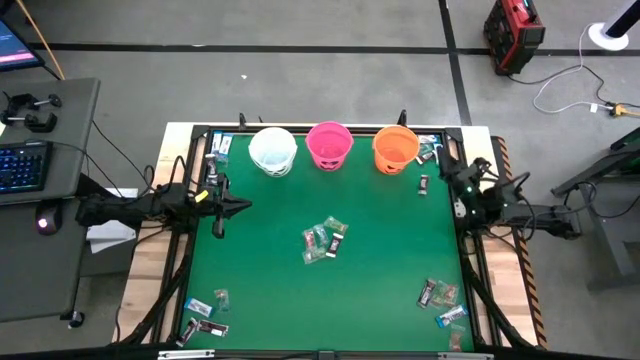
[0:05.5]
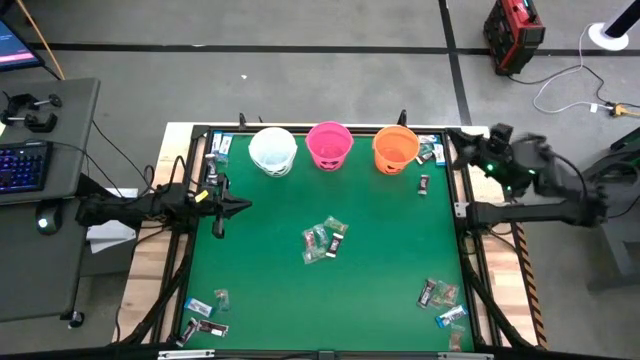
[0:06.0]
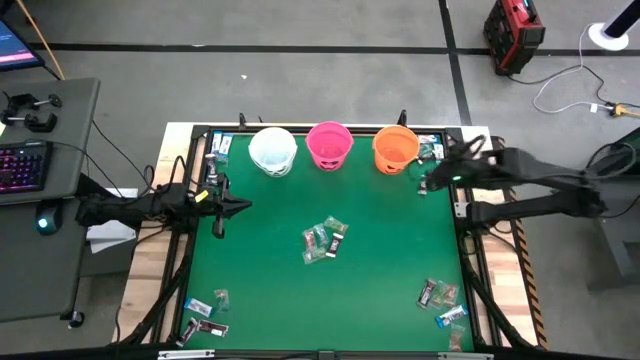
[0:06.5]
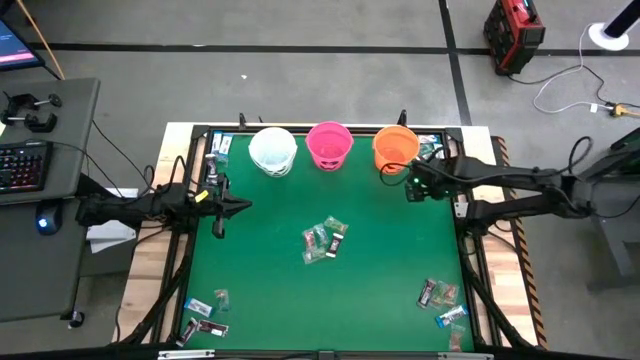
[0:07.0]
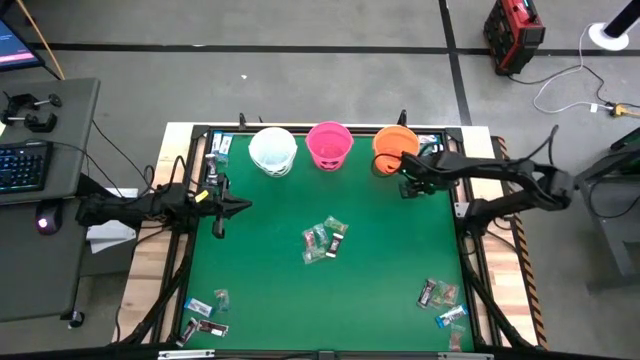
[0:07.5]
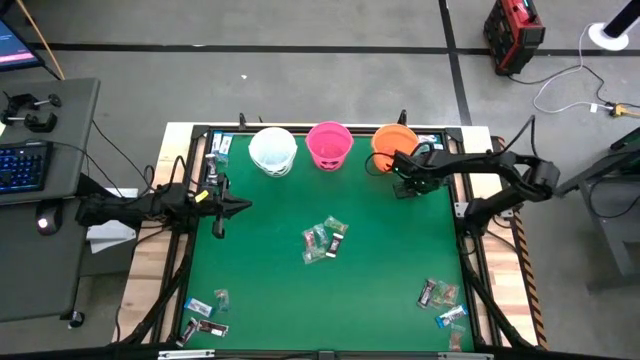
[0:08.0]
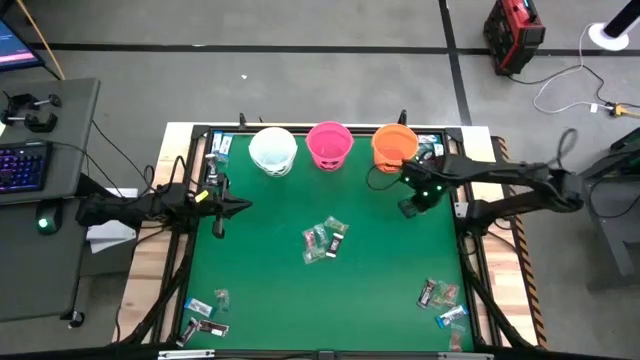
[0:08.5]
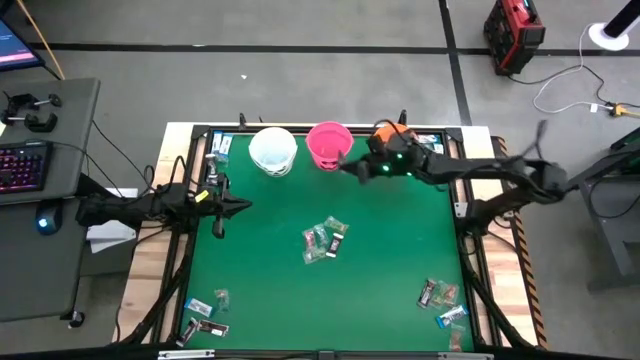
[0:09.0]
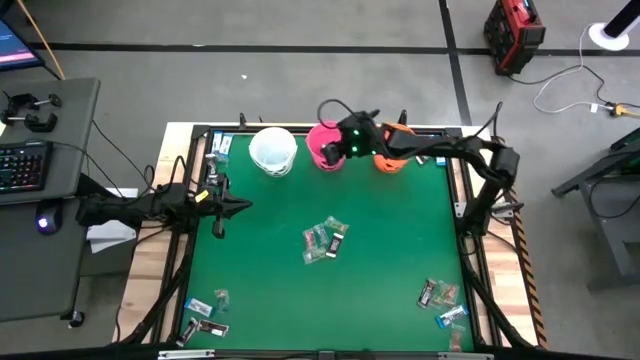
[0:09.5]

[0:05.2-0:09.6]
Task: Sort candy by brand, put in halloween buckets
Put the brown chocolate into the pink bucket

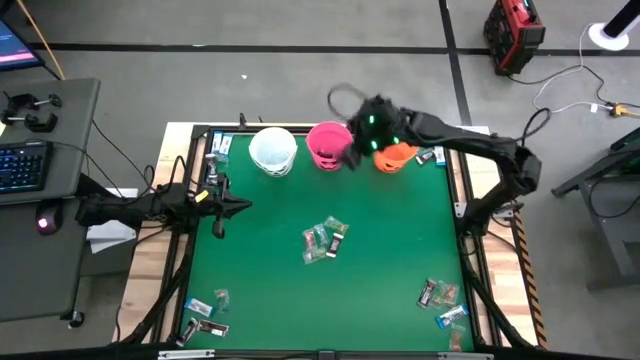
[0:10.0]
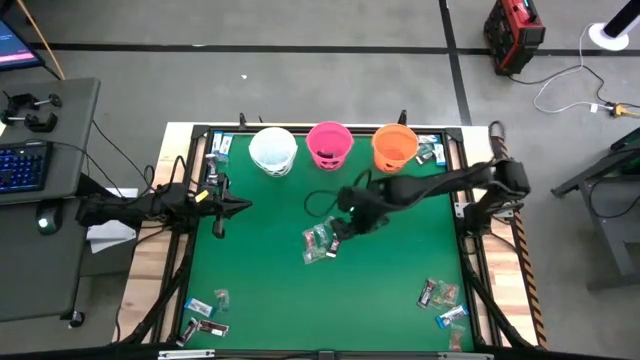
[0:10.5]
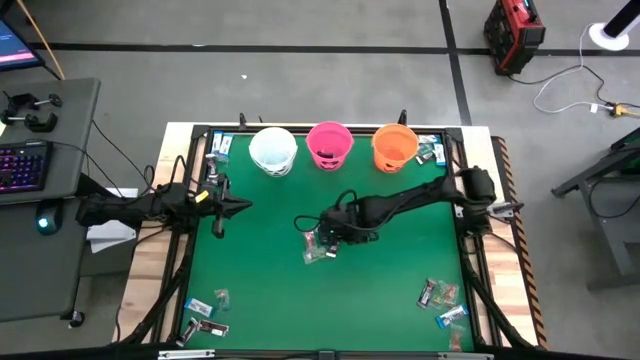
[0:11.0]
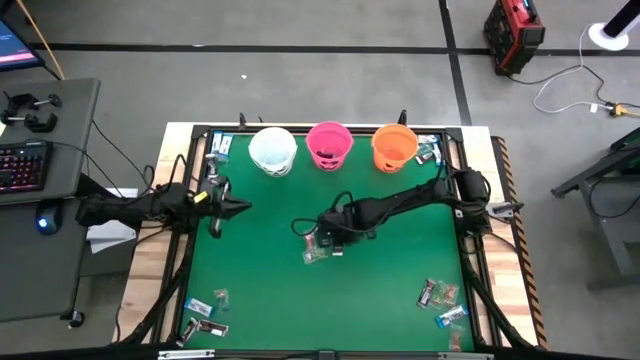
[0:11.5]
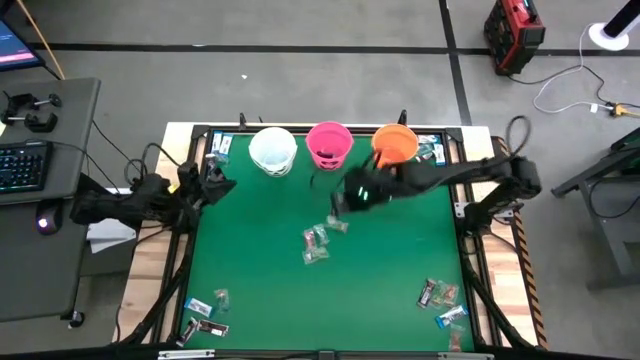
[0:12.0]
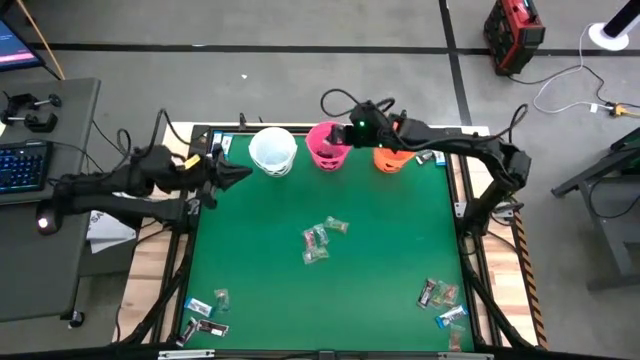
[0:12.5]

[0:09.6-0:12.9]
Put the brown chocolate into the pink bucket

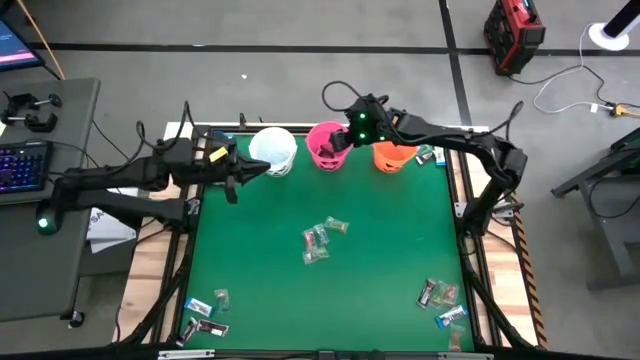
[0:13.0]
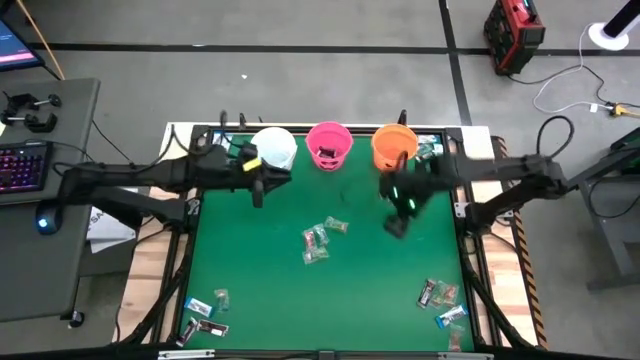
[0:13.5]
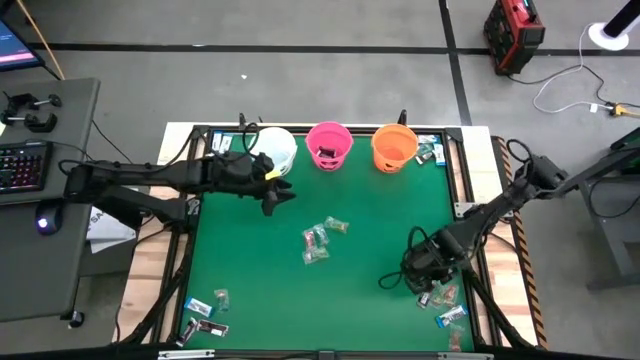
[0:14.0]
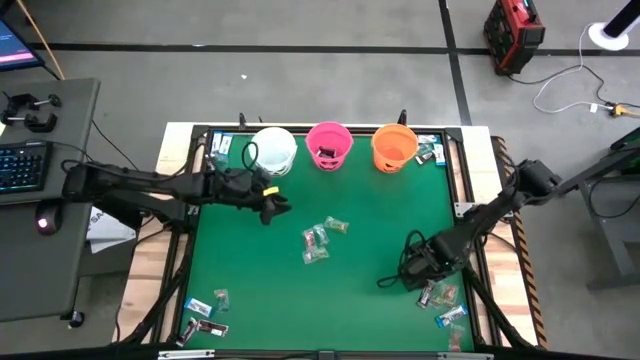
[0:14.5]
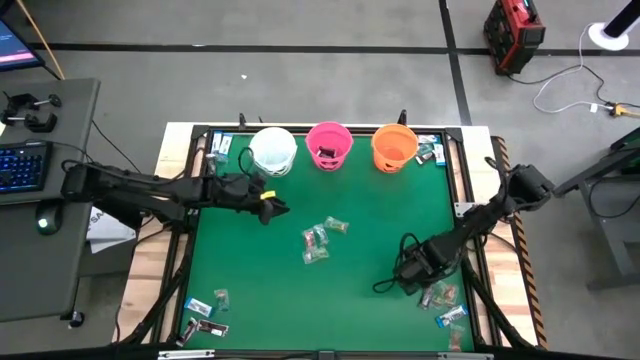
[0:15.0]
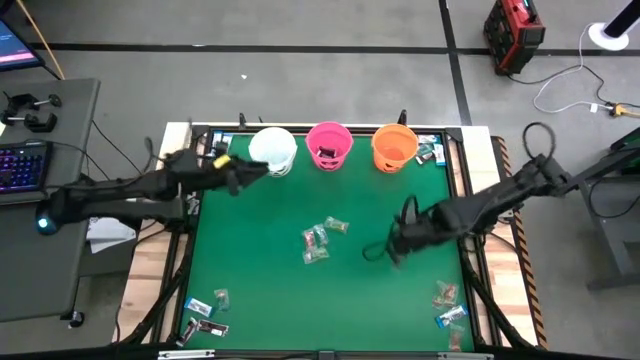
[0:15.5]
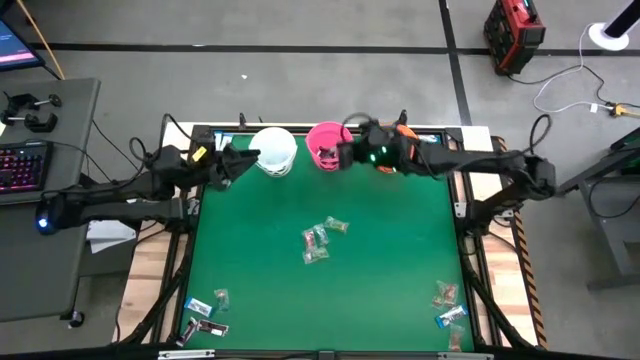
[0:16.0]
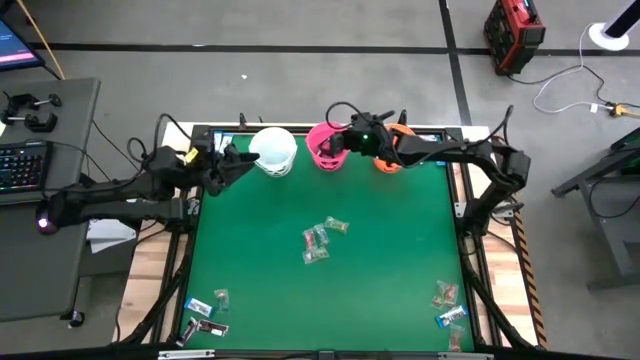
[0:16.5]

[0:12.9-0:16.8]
Put the brown chocolate into the pink bucket

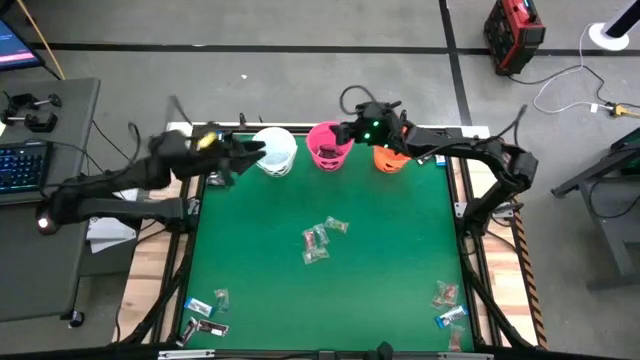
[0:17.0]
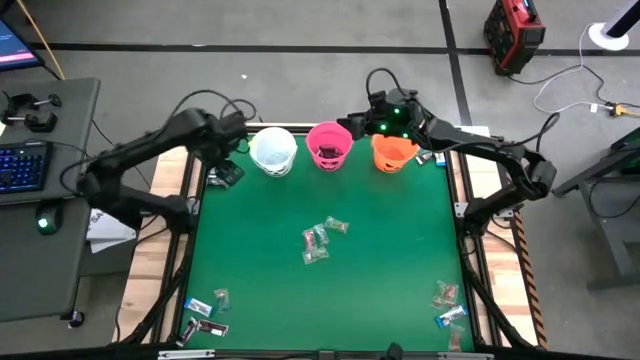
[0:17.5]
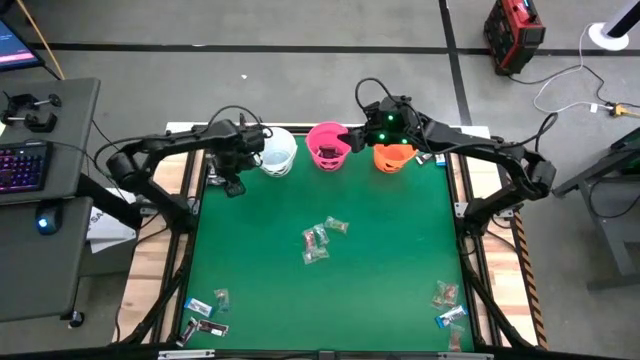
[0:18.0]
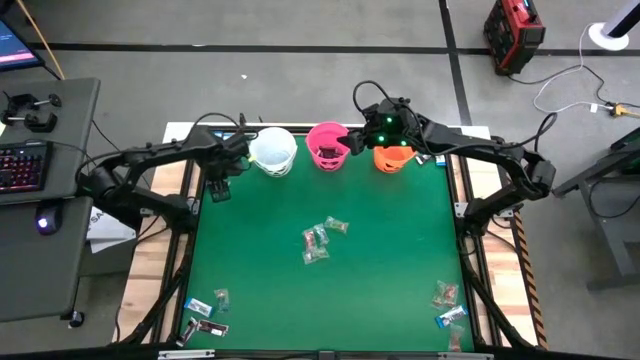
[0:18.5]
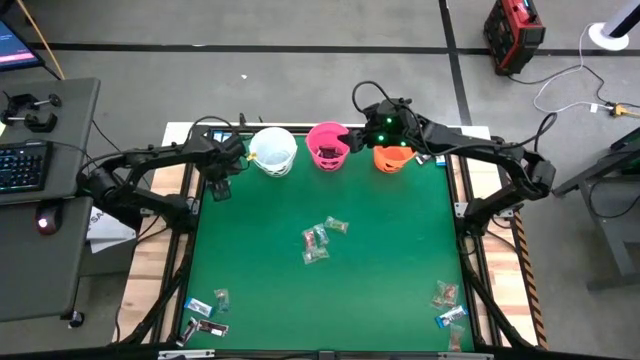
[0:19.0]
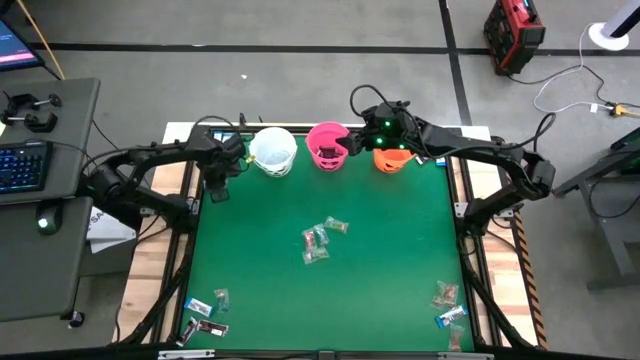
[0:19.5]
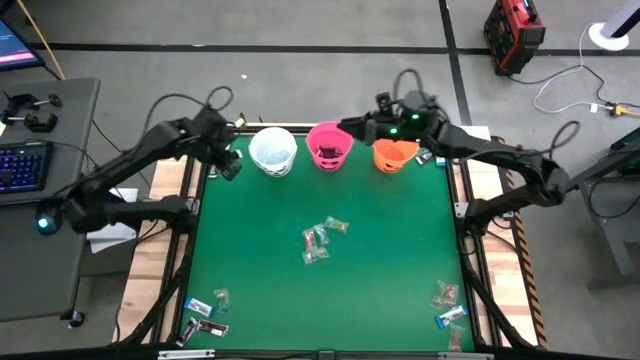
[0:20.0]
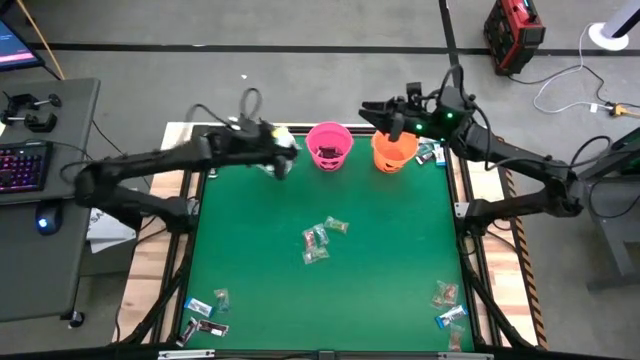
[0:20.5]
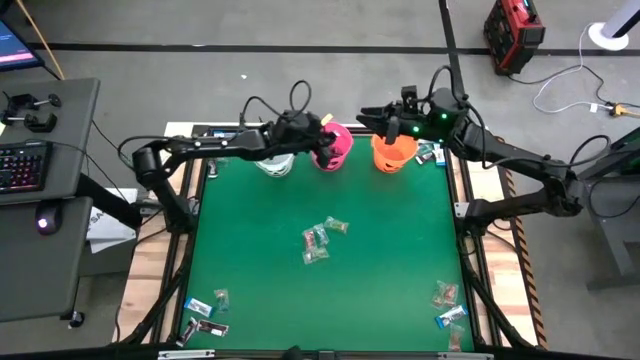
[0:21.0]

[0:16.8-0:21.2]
Put the brown chocolate into the pink bucket

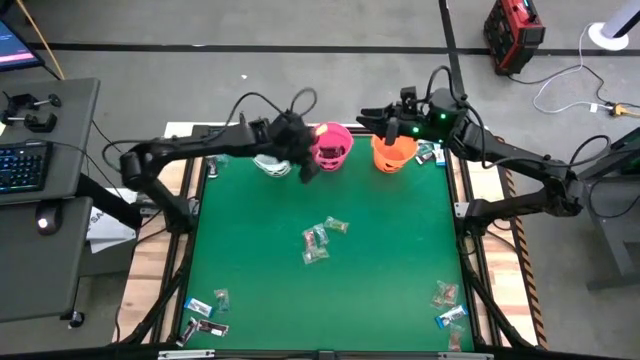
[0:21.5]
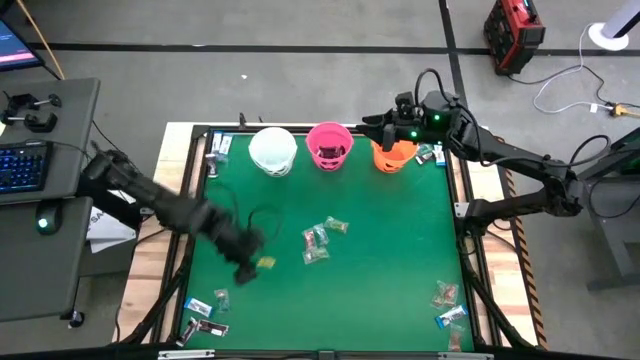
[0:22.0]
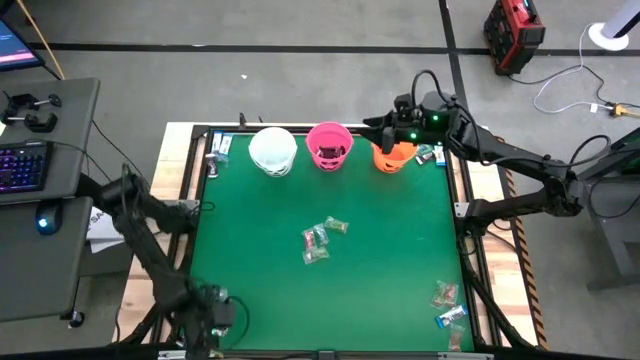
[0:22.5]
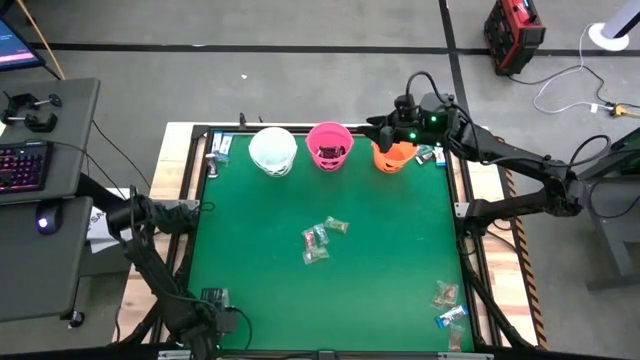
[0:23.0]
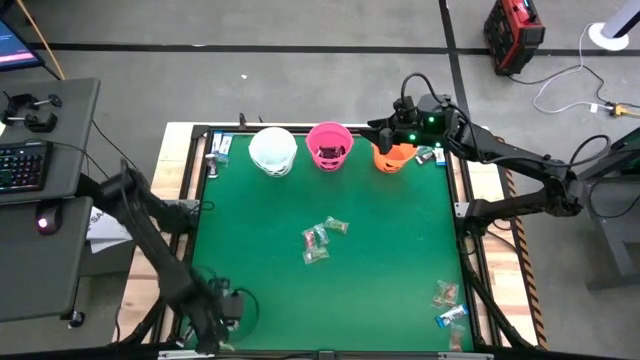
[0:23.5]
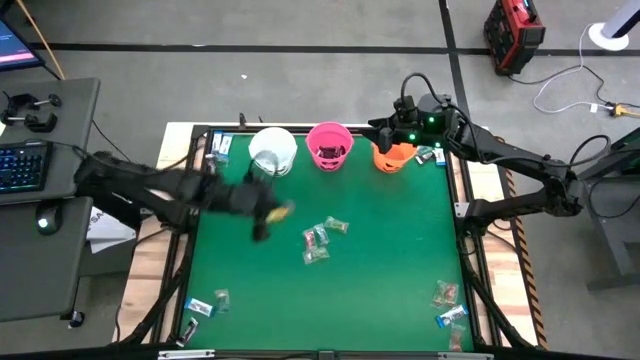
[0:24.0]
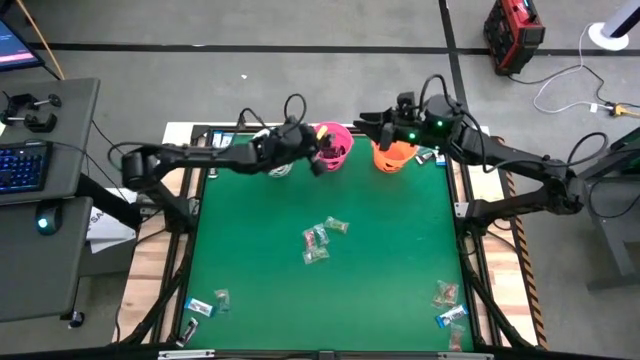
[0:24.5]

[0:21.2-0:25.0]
Put the brown chocolate into the pink bucket

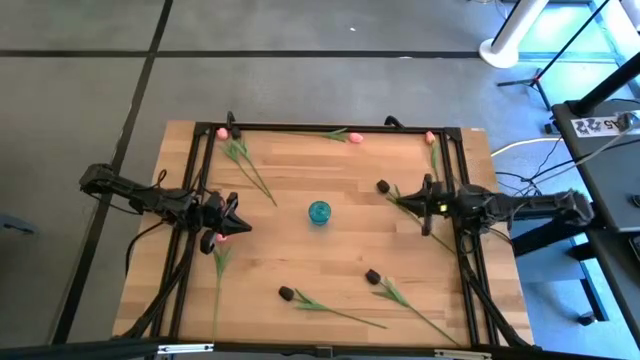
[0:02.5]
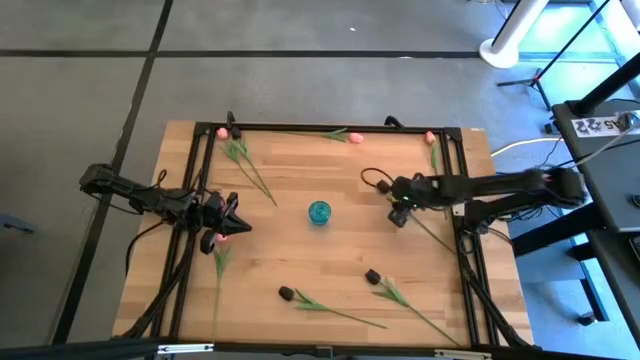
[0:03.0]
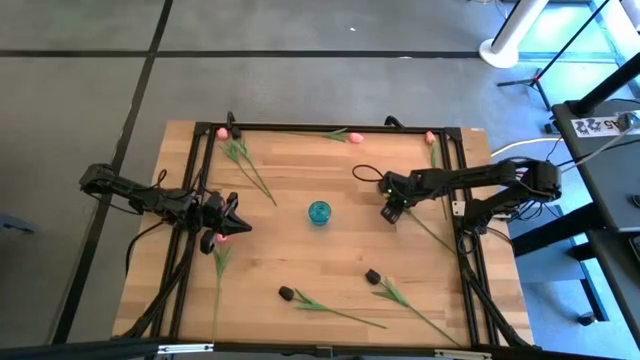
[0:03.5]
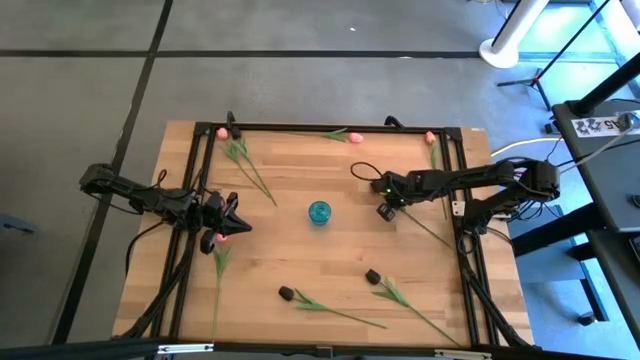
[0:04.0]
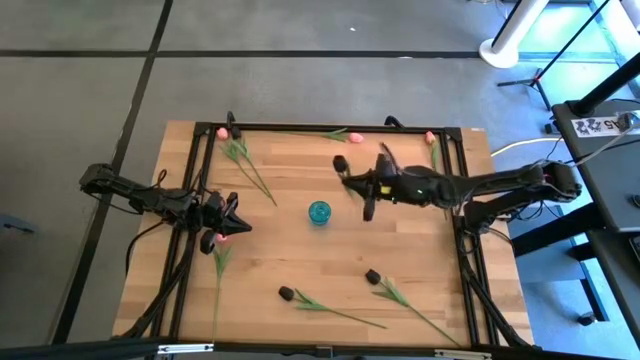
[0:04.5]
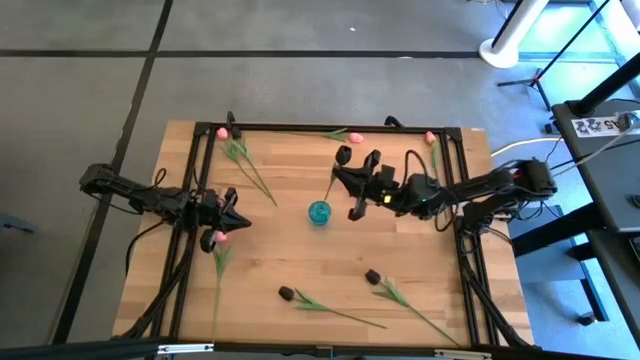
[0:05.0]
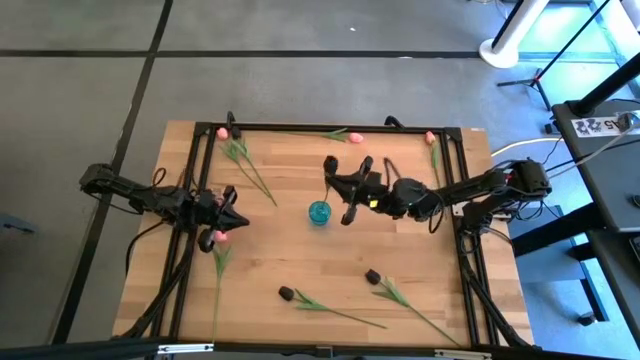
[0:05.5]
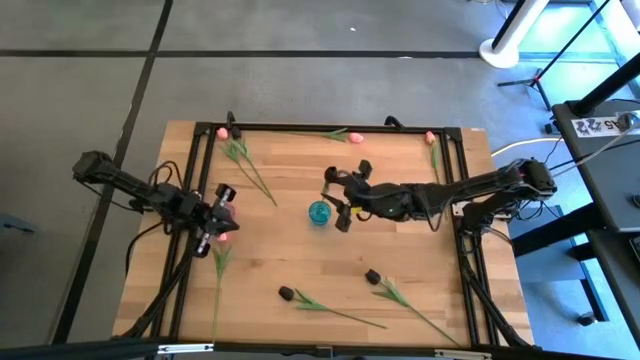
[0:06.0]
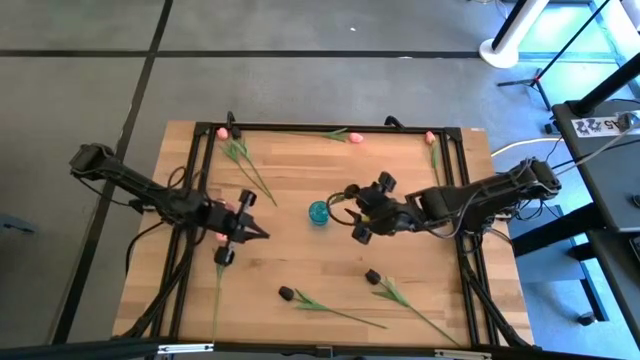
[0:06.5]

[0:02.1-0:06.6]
Task: Sort flowers into vase by color
Put the middle black tulip into the blue vase
